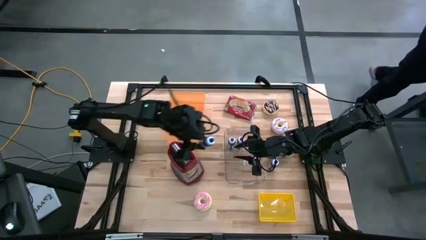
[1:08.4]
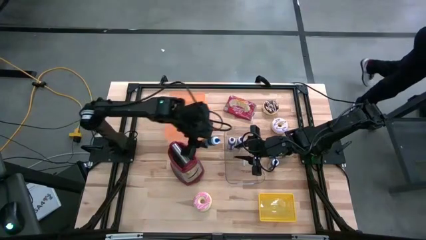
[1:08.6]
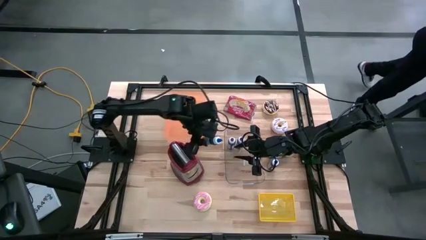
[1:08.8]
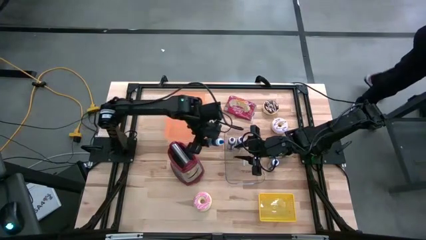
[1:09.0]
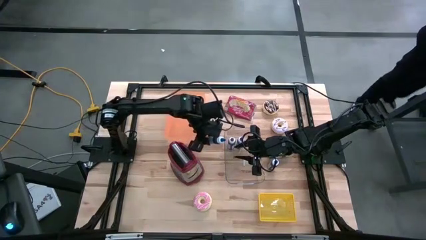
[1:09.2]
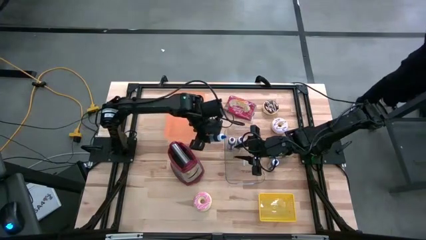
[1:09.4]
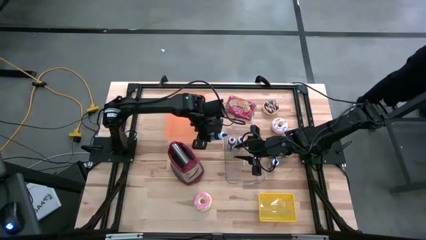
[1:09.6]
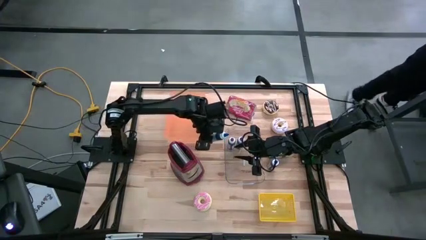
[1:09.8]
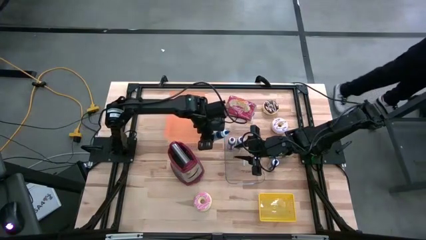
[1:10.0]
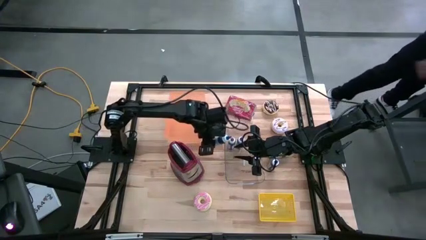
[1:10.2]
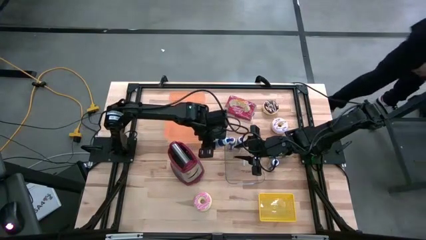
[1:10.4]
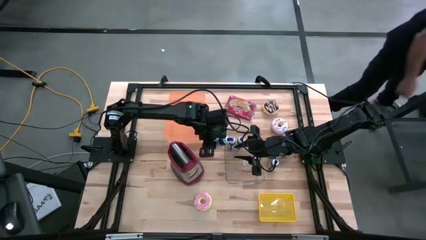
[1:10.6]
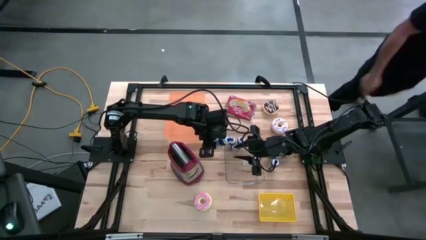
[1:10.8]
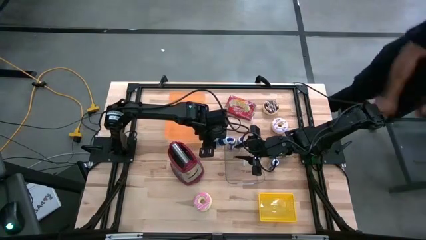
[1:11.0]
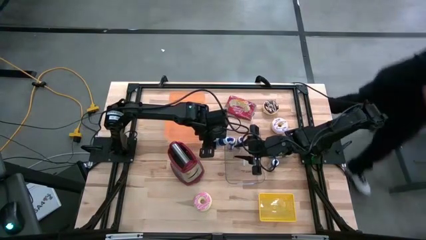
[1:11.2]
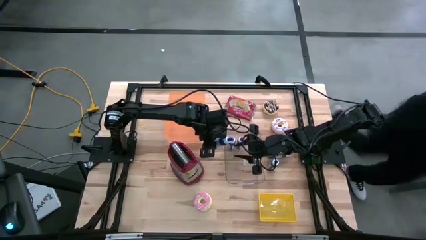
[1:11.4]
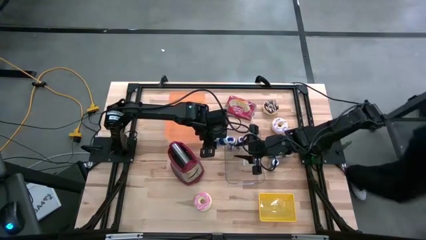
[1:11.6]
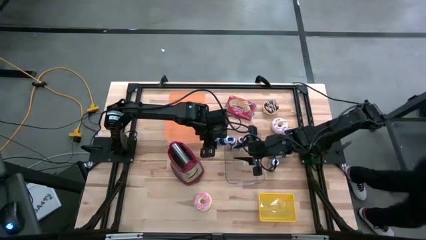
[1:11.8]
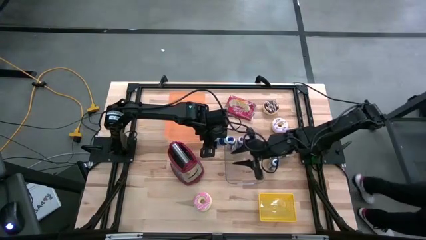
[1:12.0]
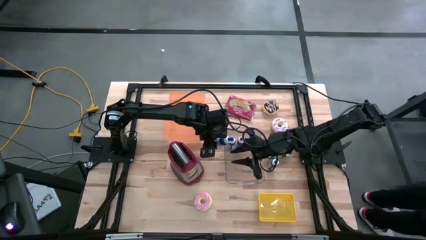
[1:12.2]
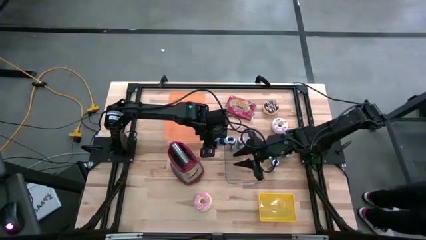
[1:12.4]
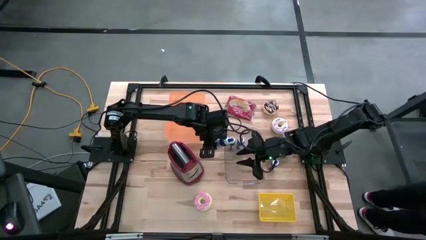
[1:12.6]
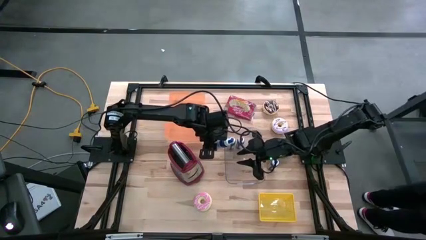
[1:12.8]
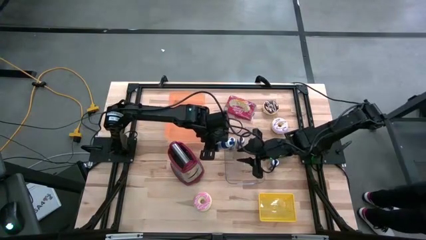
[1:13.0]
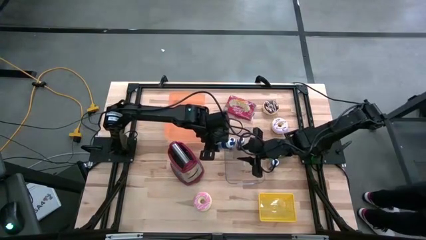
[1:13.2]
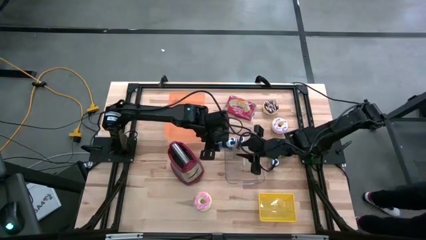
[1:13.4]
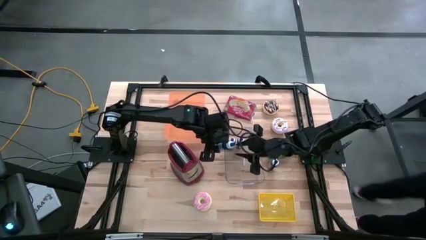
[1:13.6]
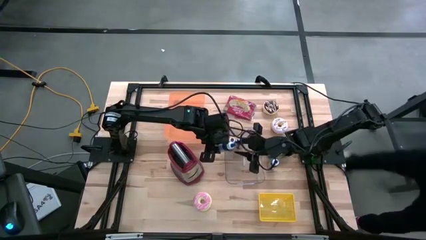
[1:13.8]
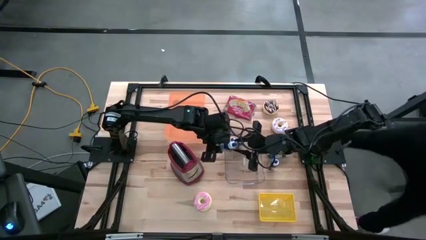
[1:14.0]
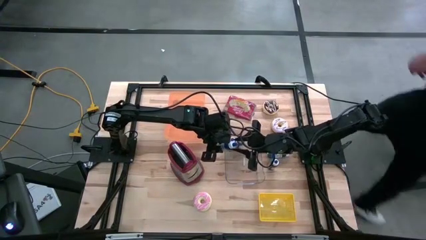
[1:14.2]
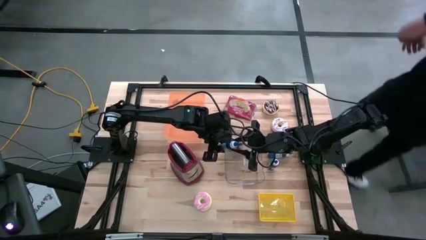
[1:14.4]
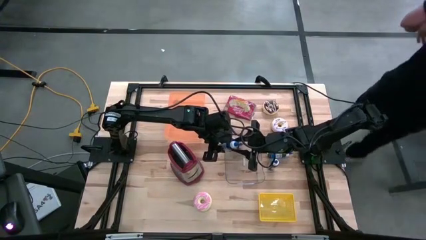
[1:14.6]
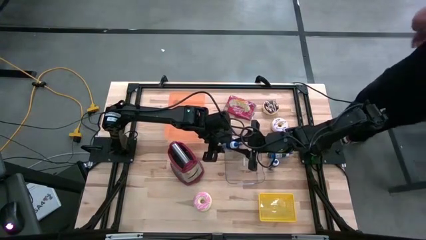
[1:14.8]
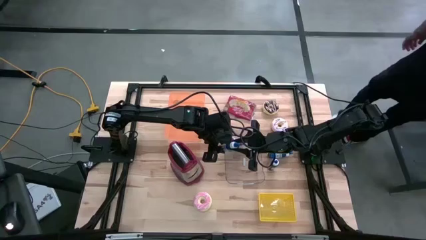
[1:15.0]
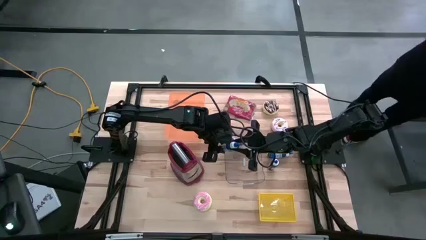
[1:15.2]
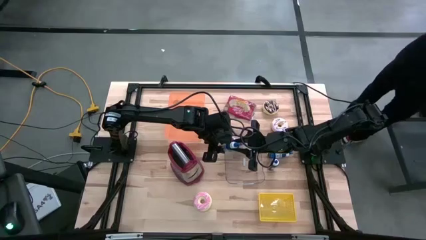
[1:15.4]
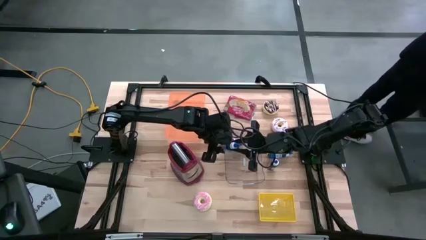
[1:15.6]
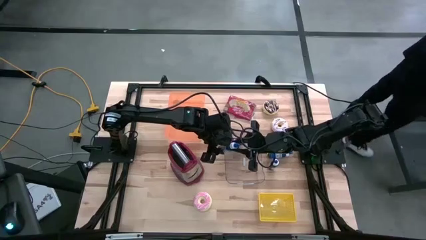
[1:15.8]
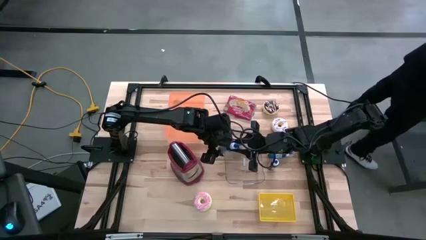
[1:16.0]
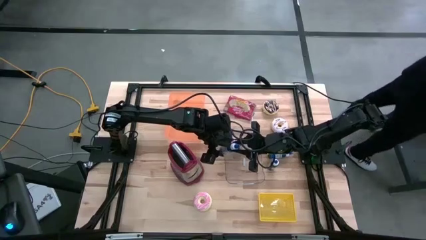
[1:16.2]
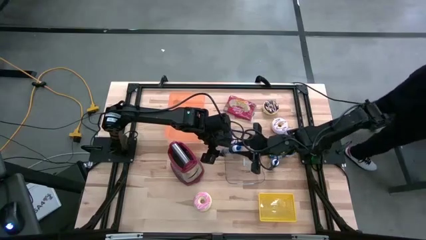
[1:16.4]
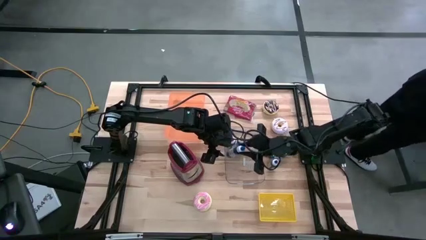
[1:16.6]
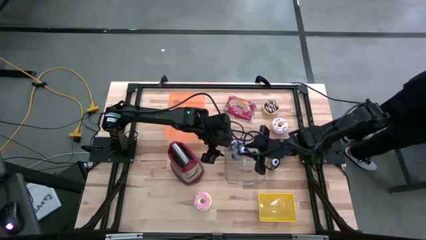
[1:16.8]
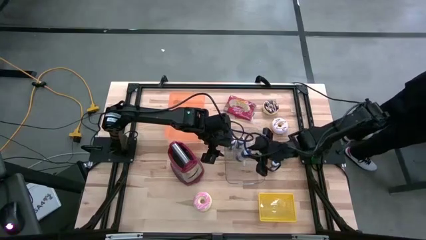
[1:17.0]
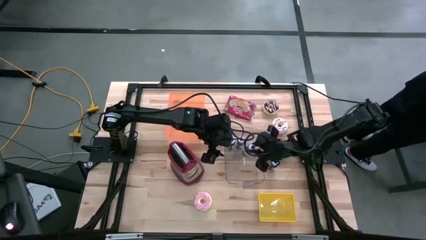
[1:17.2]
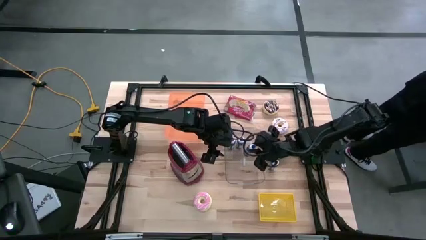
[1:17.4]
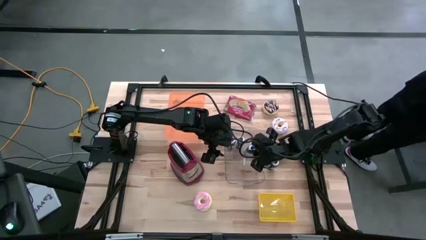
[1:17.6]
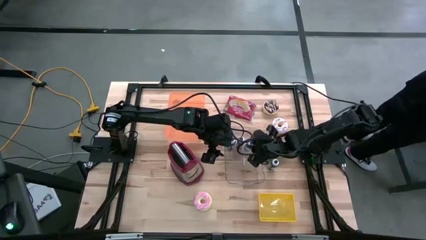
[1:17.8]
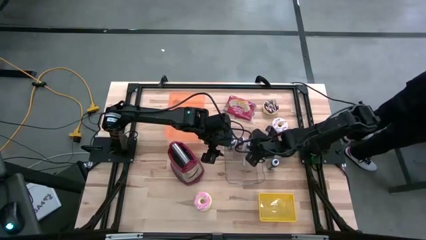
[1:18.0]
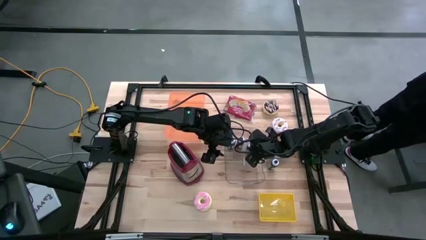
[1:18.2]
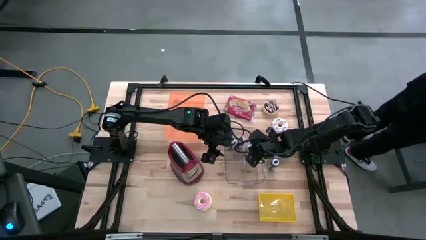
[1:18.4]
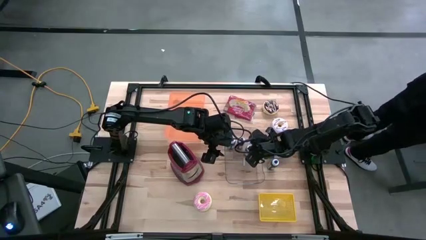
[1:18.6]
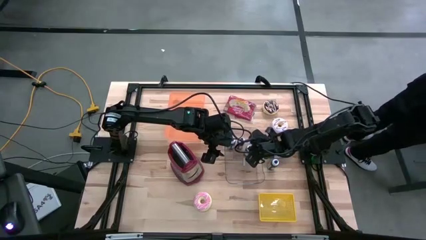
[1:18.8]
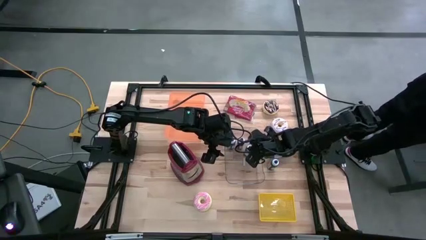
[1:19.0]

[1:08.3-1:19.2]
Task: Pick & Place Food Item
Put the bottom left blue food coloring bottle into the transparent bin
